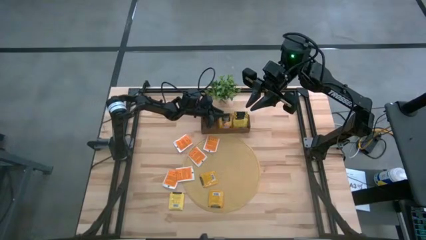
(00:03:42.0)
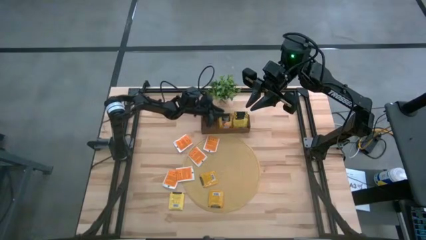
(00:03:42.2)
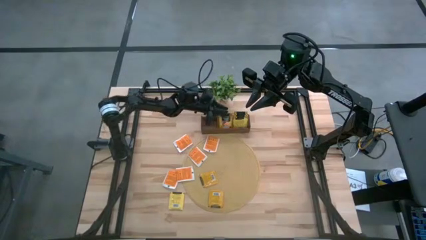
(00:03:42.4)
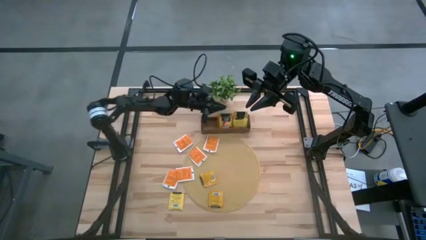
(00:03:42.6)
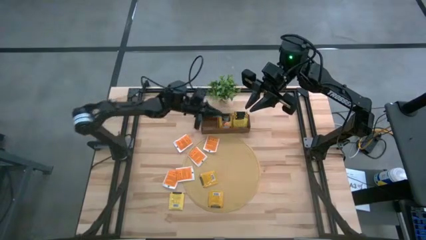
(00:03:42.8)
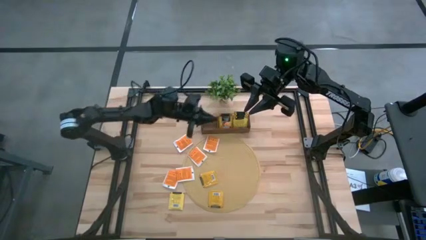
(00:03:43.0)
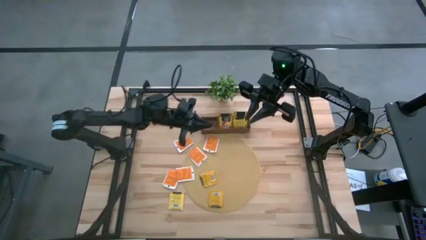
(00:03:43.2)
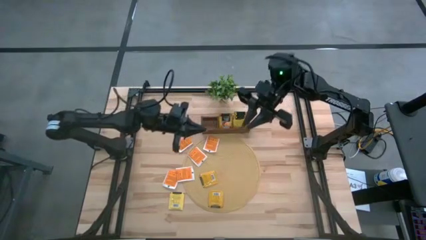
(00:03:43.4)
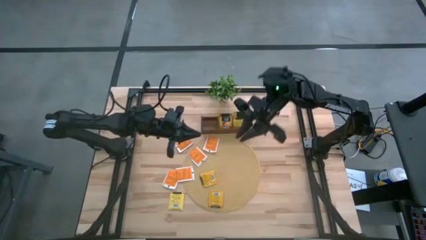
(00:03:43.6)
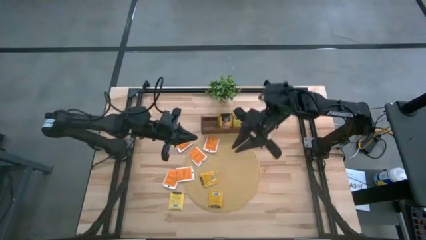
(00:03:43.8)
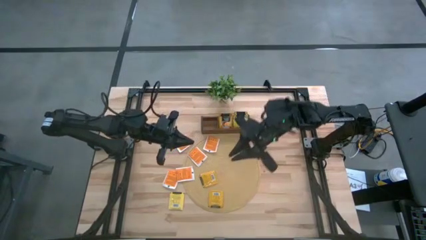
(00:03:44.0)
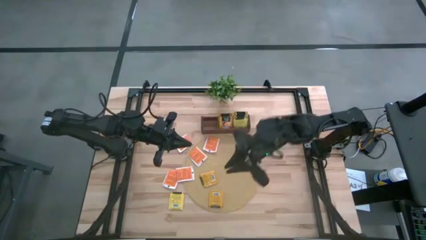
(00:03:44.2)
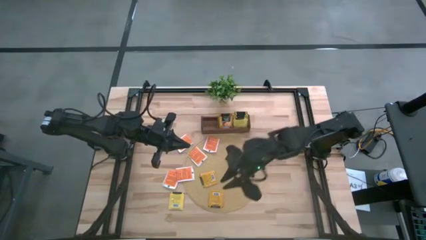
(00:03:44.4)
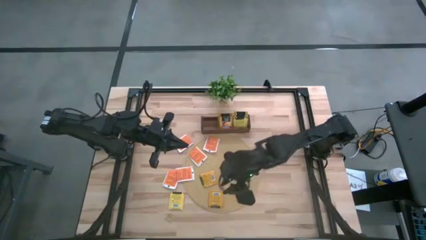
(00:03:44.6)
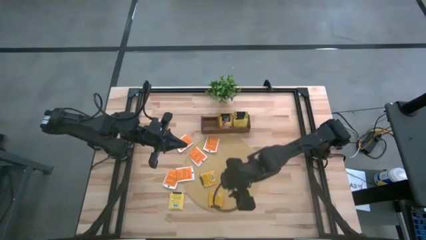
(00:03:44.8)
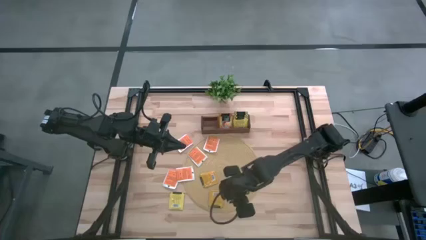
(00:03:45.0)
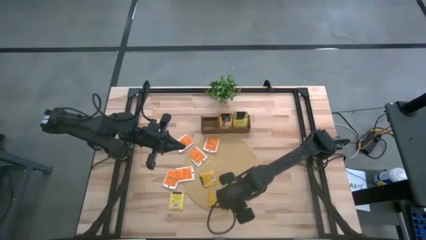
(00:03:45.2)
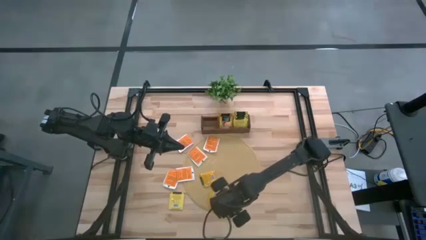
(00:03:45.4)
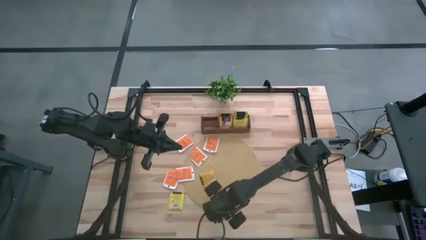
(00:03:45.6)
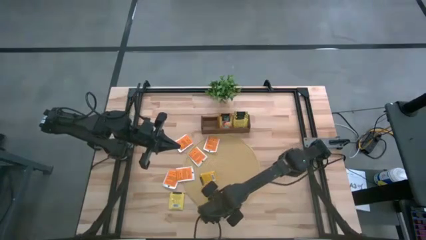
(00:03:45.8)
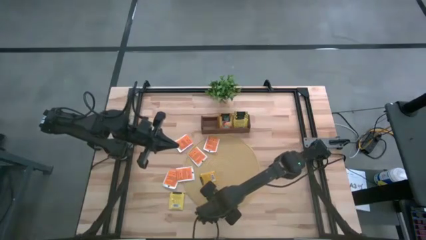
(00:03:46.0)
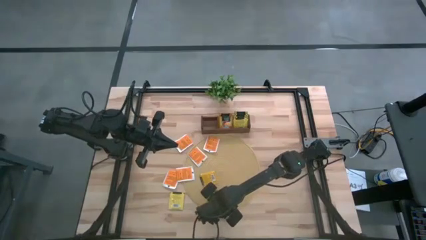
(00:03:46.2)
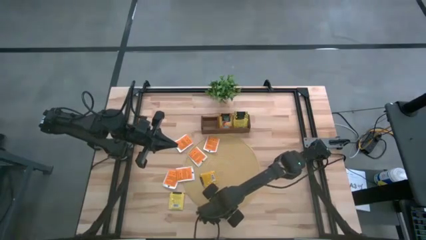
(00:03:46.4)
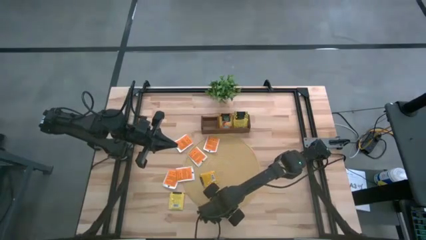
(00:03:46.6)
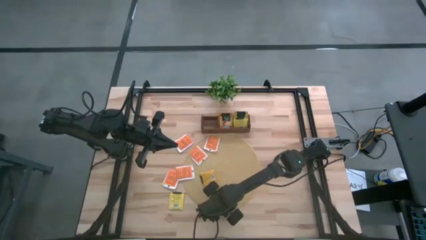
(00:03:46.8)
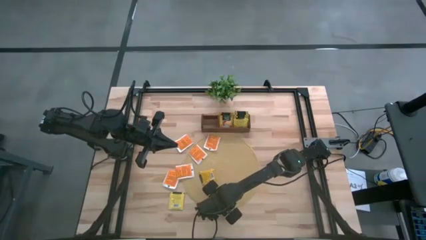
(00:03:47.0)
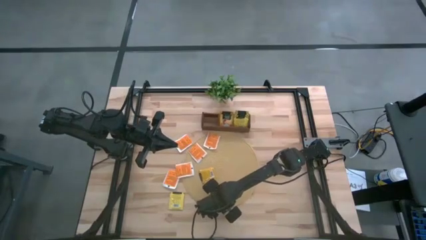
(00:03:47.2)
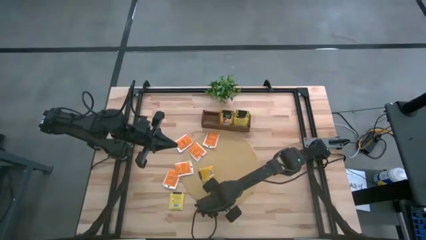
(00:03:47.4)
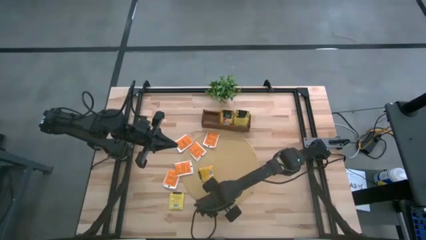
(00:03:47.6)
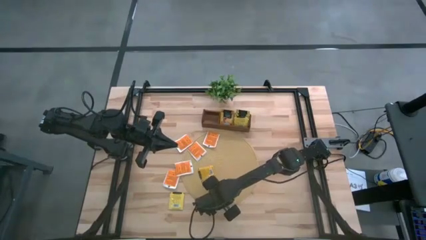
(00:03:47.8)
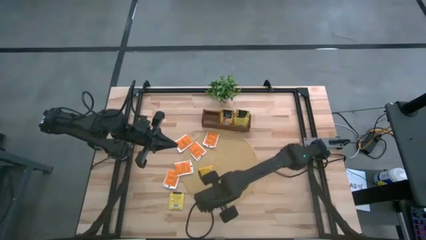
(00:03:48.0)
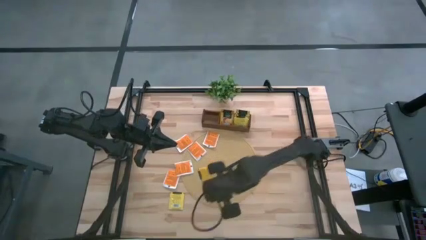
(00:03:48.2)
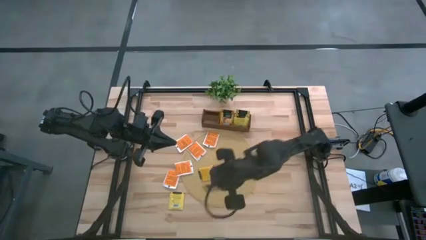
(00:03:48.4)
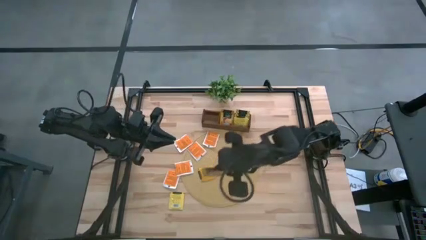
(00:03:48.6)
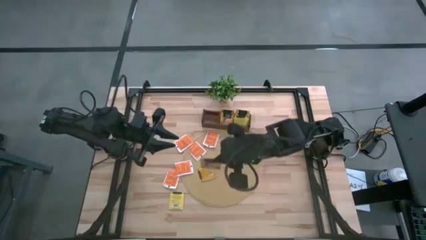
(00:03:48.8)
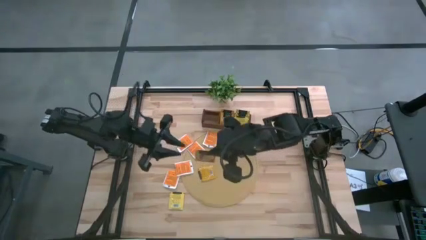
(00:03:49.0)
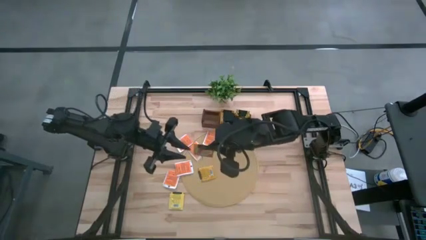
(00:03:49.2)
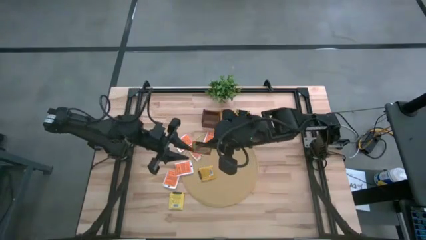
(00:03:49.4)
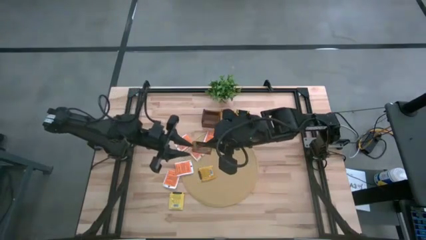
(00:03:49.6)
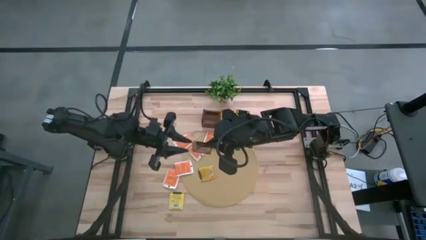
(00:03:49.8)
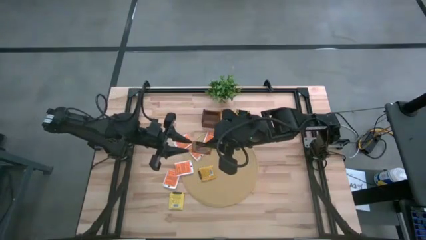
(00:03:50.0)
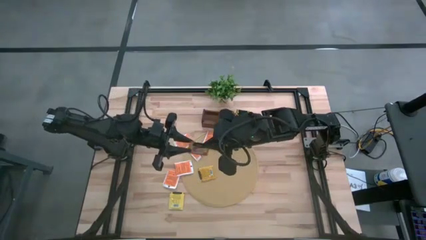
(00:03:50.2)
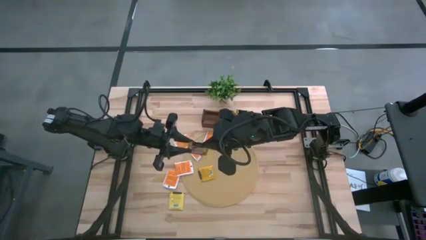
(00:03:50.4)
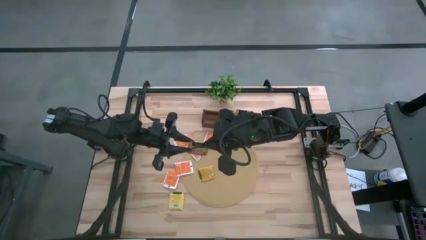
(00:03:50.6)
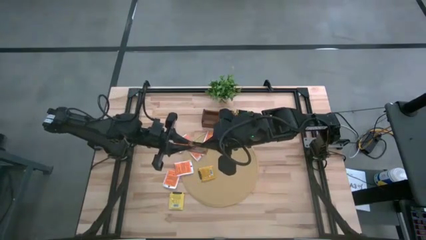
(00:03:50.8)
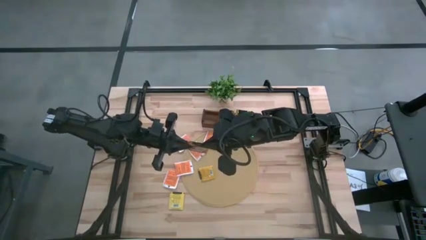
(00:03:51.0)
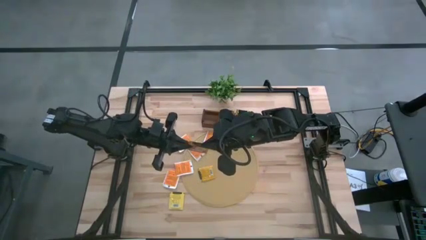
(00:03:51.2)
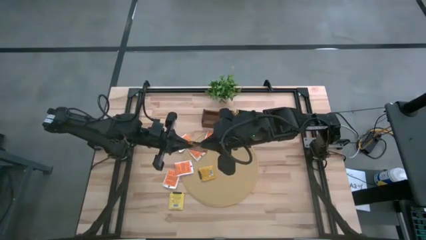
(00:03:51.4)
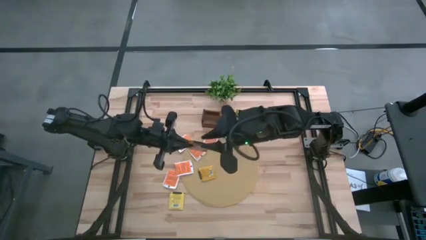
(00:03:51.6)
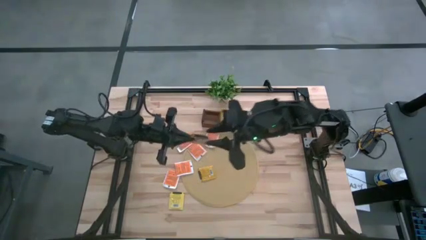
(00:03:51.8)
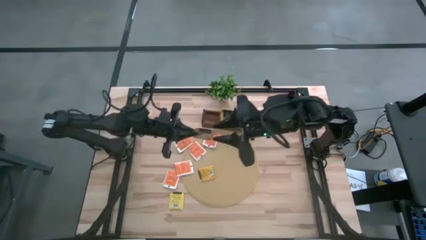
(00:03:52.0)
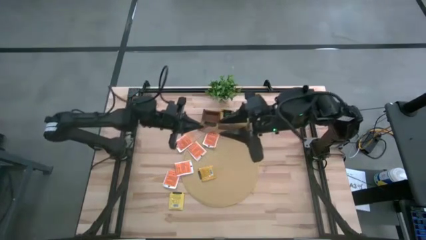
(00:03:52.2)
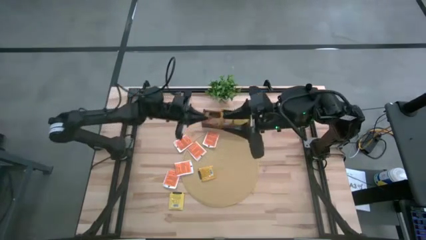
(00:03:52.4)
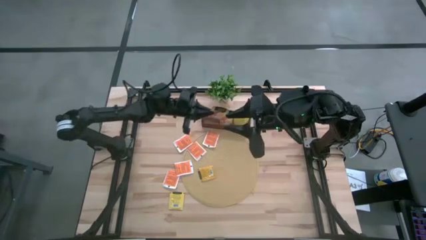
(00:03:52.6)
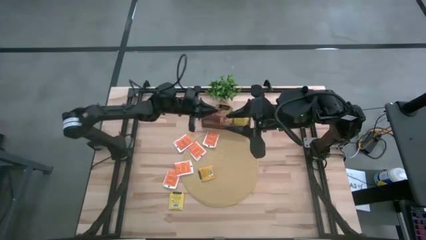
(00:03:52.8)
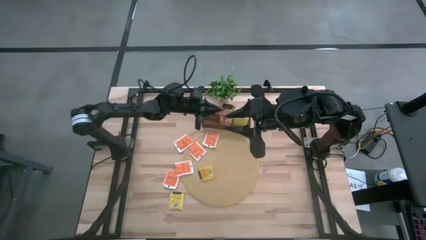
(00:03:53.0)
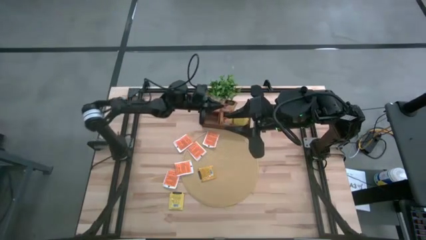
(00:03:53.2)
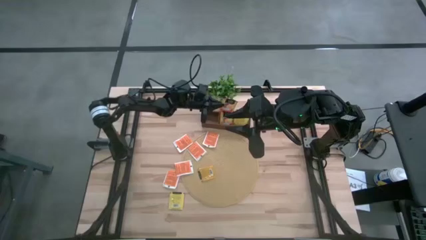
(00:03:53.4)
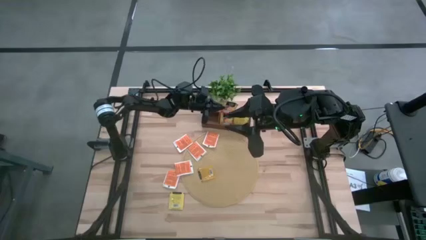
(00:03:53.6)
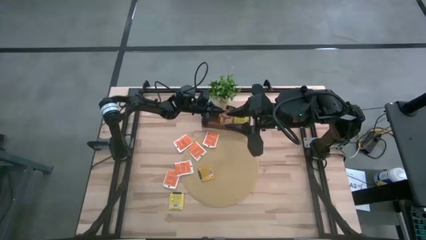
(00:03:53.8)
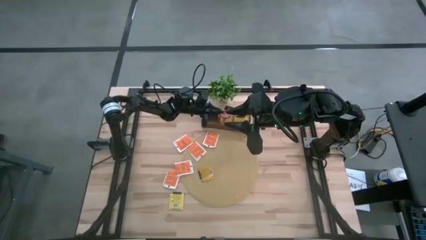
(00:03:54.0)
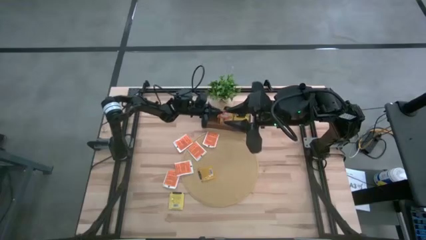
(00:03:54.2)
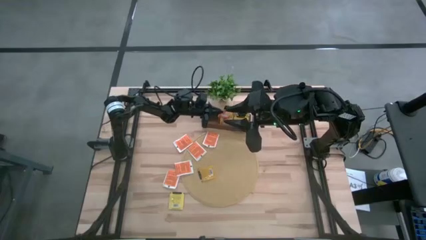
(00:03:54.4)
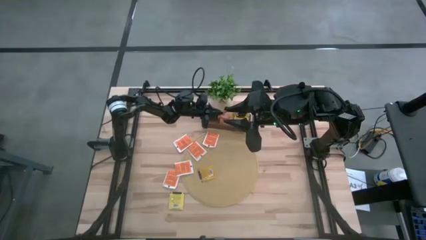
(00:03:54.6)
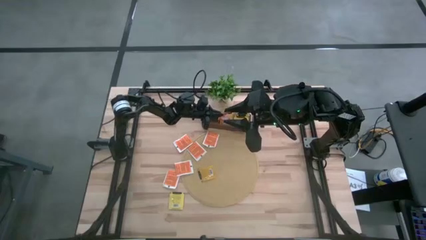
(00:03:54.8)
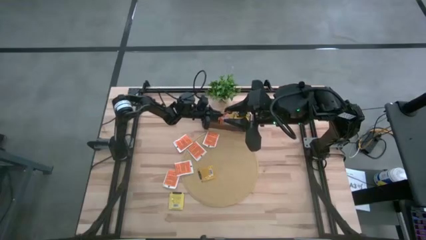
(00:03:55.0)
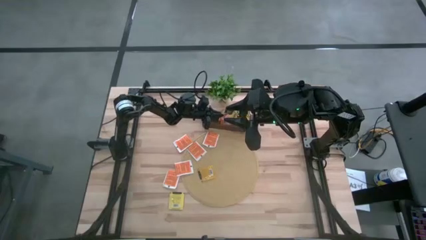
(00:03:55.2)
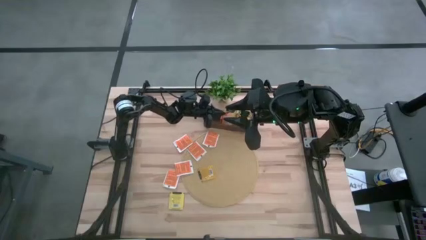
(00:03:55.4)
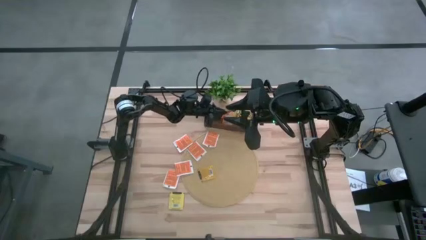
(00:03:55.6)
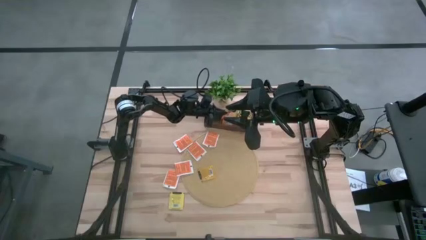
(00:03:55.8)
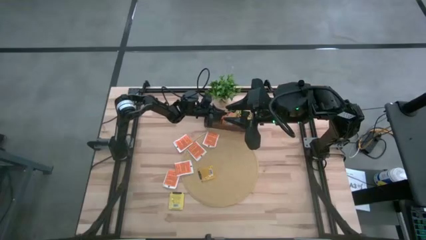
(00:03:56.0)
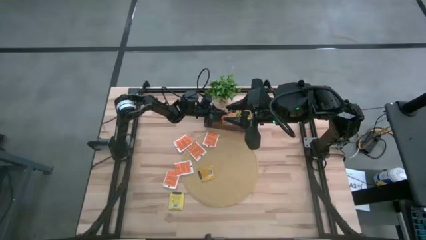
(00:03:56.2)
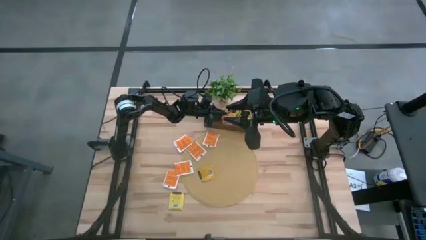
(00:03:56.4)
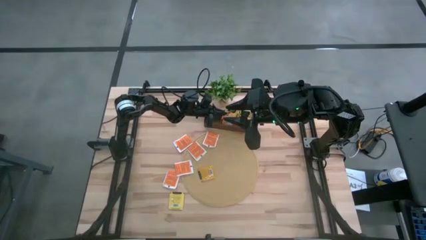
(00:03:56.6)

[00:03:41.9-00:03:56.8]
Task: Pick & Place Tea
Put the orange tea bag into the middle section of the wooden organizer

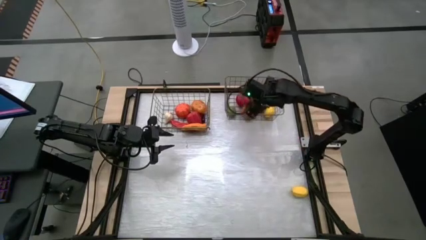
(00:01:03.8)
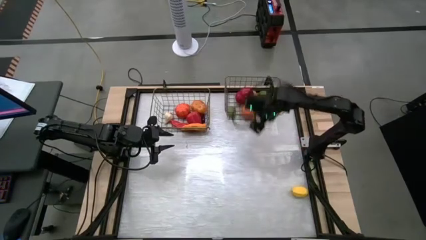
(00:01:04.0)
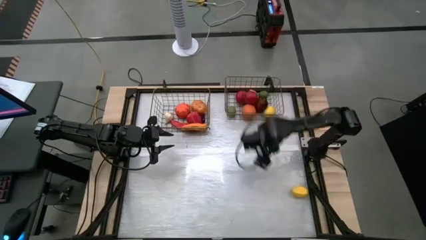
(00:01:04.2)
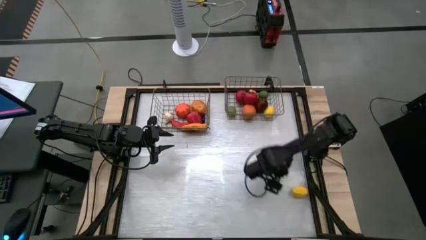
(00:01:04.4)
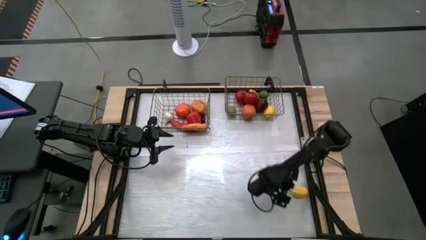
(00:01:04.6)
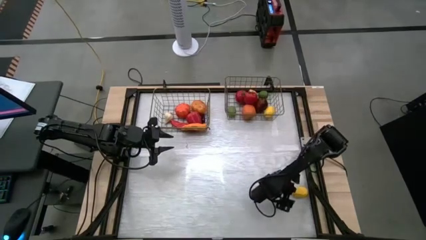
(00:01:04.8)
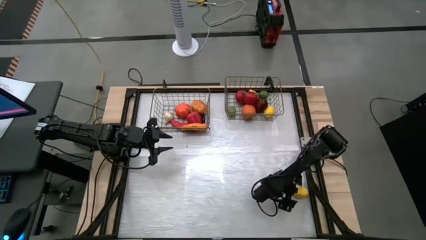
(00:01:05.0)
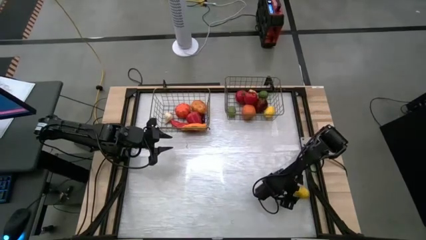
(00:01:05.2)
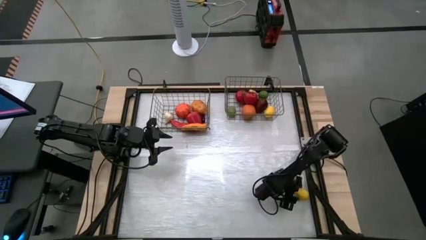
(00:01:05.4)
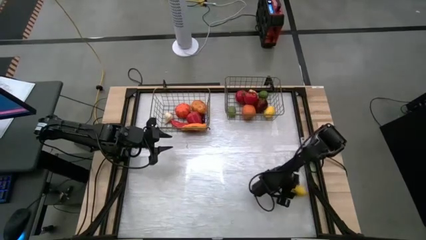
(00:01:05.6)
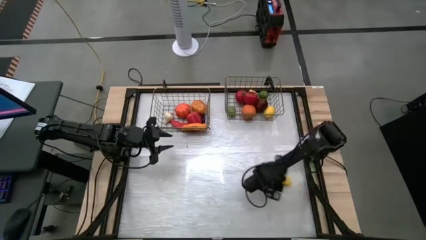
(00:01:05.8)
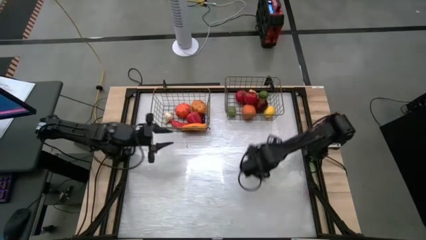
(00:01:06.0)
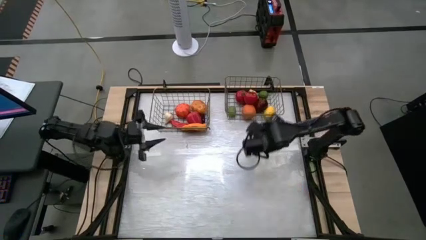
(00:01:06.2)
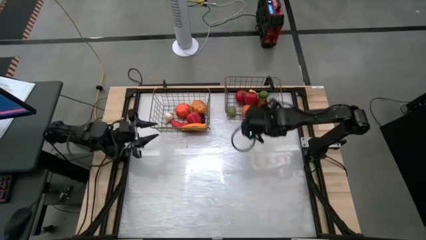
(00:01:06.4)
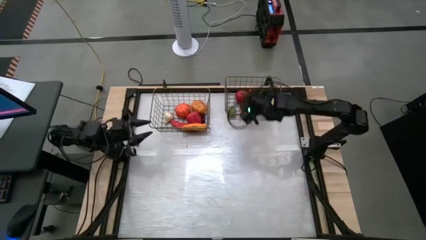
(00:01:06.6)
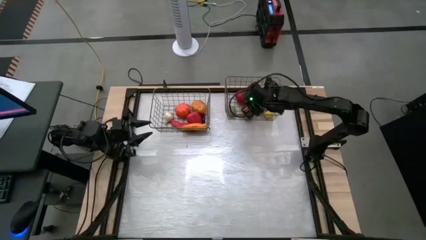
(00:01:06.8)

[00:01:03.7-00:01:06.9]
Task: Sort produce into baskets
Put the yellow lemon into the right gold wire basket
